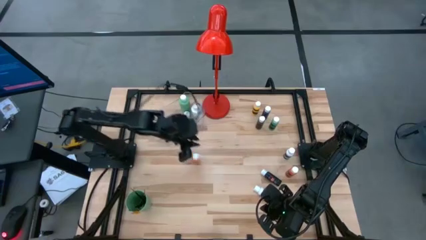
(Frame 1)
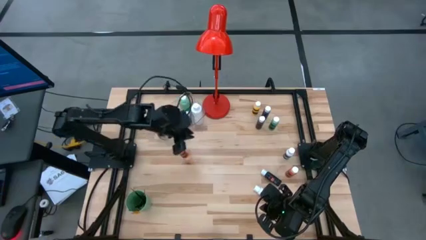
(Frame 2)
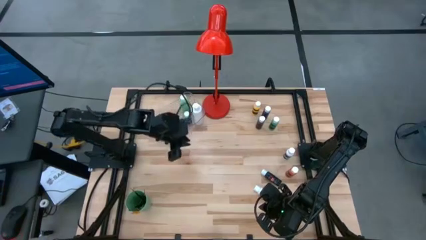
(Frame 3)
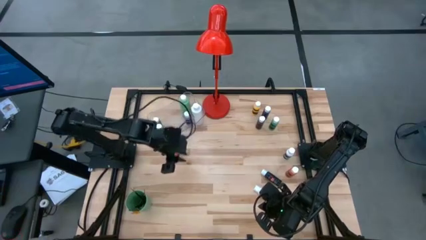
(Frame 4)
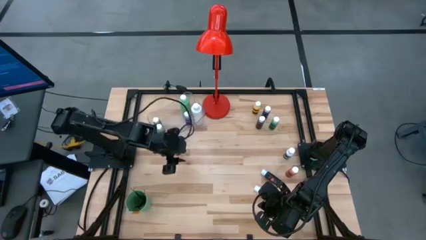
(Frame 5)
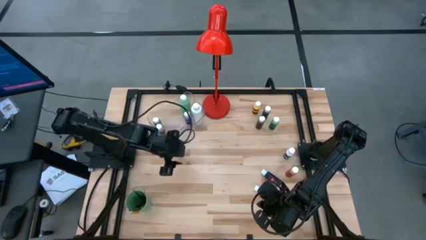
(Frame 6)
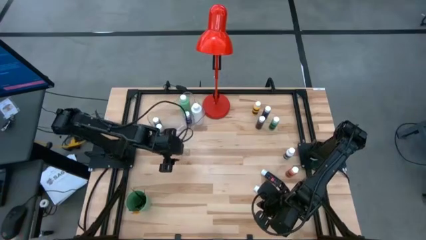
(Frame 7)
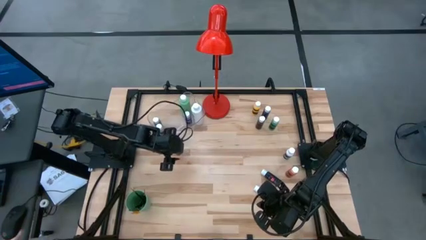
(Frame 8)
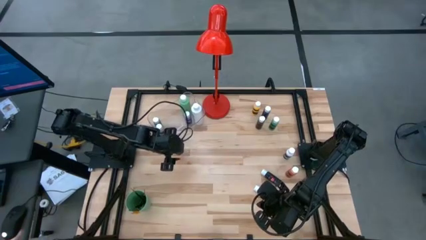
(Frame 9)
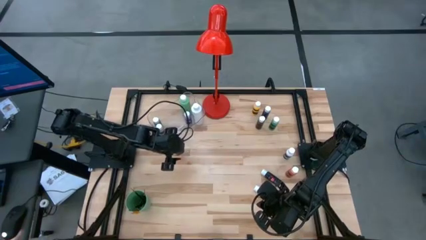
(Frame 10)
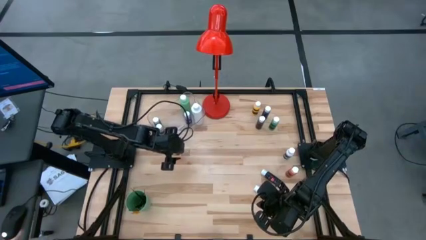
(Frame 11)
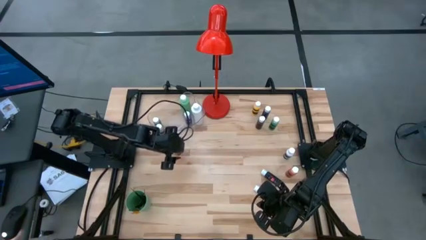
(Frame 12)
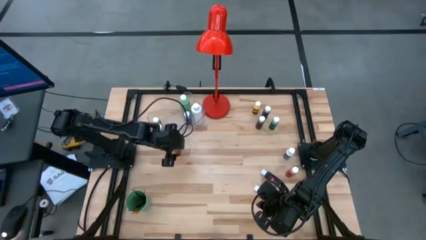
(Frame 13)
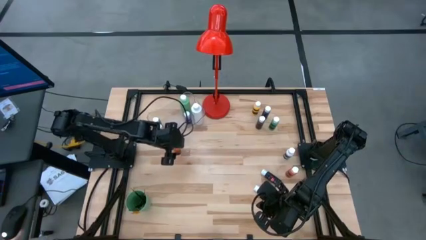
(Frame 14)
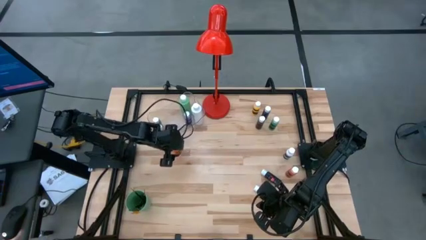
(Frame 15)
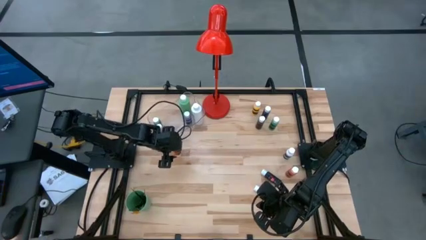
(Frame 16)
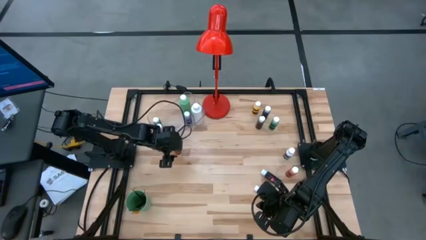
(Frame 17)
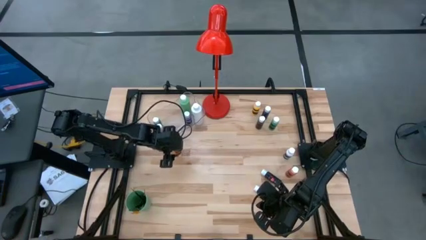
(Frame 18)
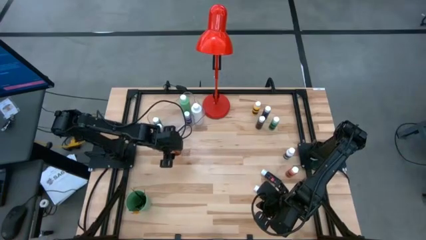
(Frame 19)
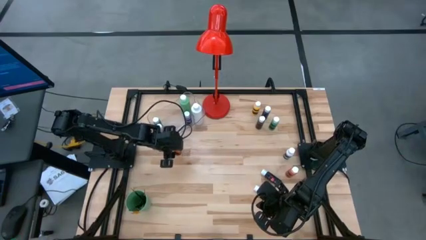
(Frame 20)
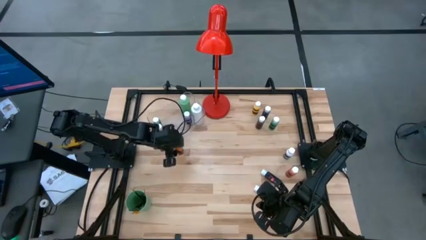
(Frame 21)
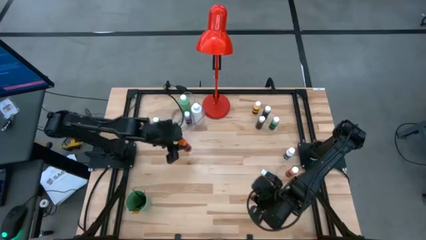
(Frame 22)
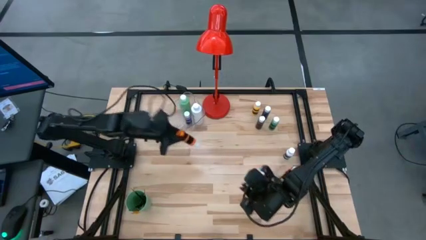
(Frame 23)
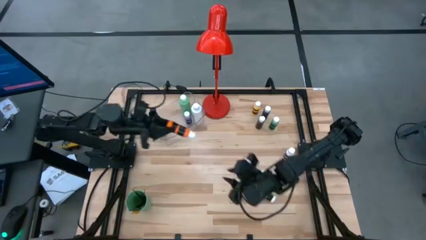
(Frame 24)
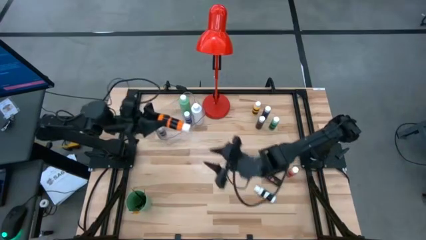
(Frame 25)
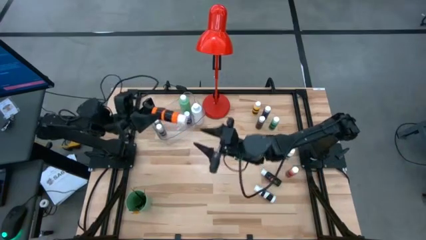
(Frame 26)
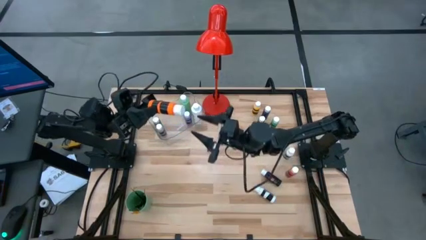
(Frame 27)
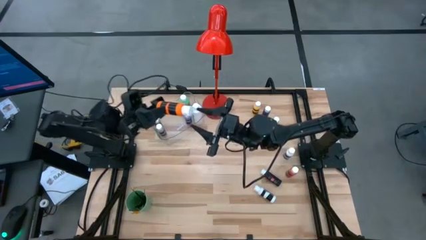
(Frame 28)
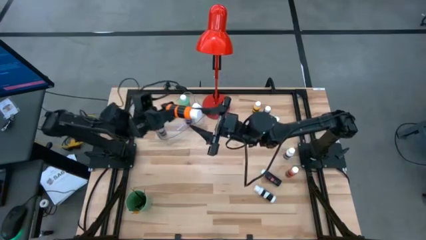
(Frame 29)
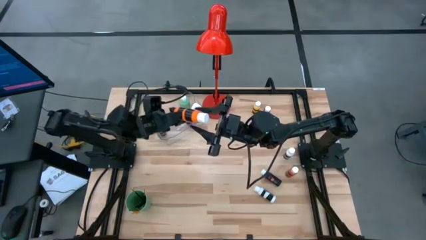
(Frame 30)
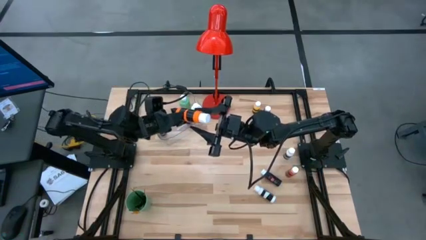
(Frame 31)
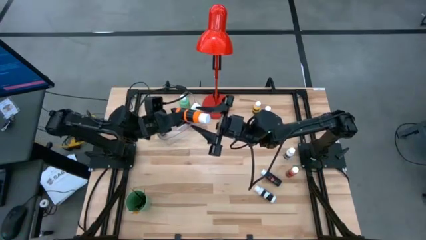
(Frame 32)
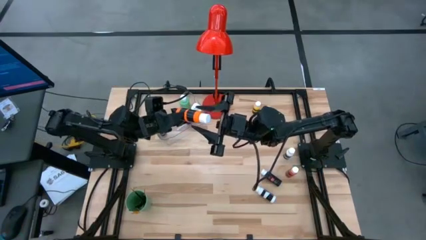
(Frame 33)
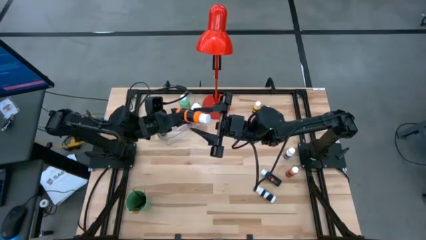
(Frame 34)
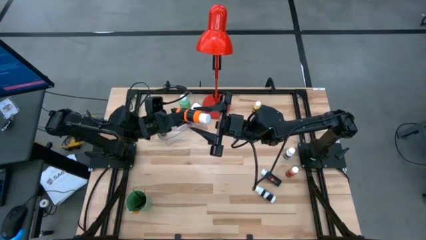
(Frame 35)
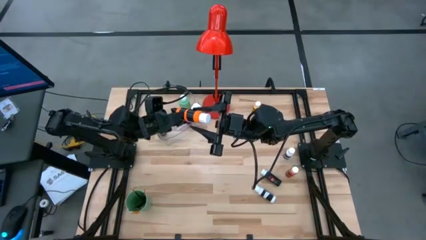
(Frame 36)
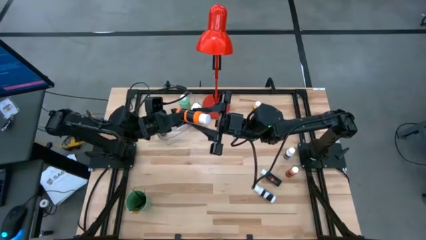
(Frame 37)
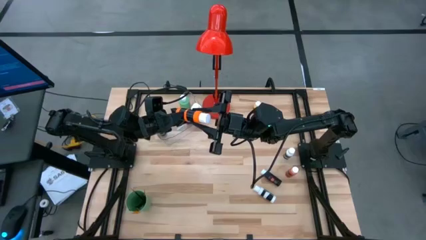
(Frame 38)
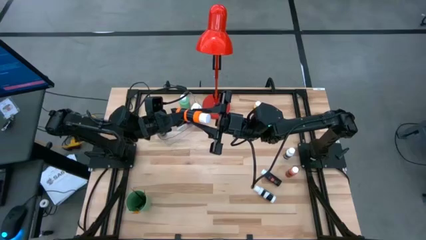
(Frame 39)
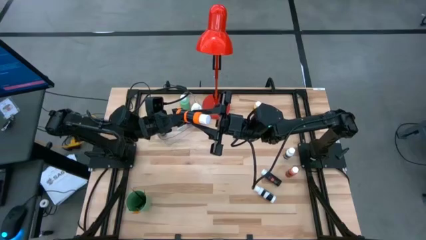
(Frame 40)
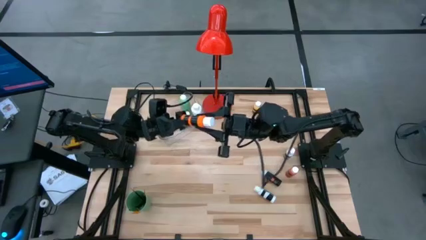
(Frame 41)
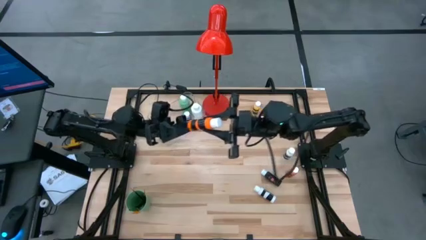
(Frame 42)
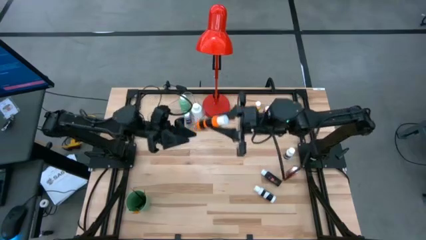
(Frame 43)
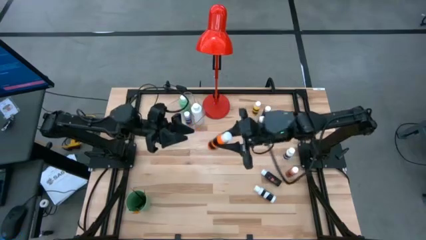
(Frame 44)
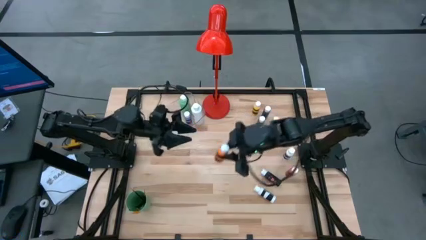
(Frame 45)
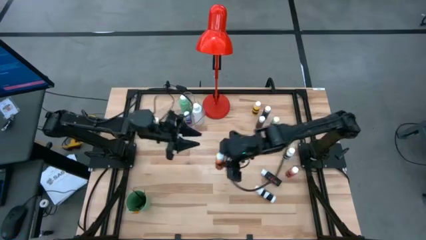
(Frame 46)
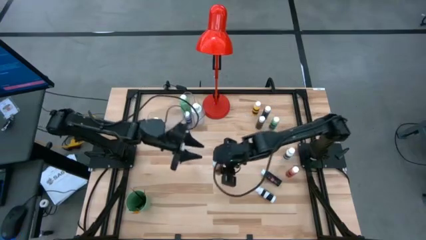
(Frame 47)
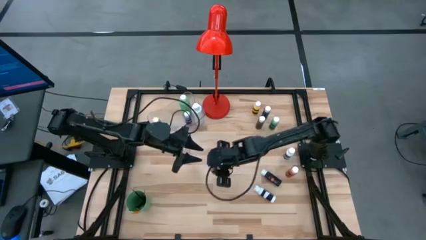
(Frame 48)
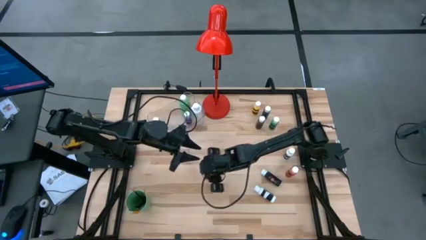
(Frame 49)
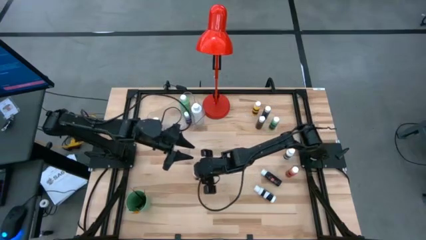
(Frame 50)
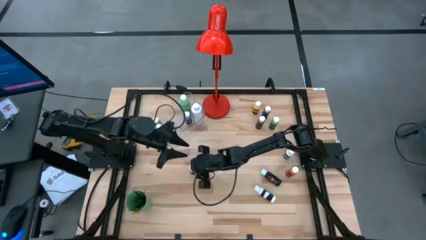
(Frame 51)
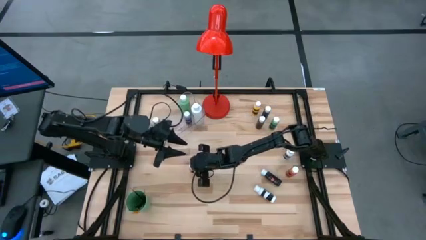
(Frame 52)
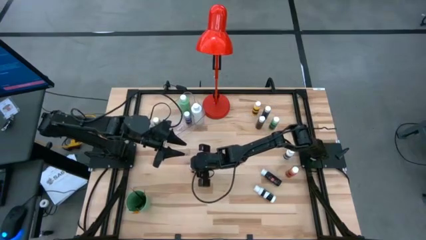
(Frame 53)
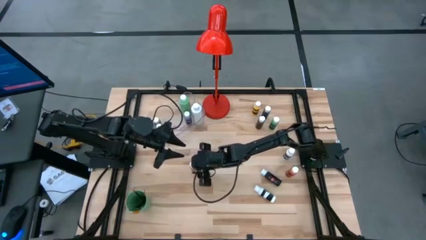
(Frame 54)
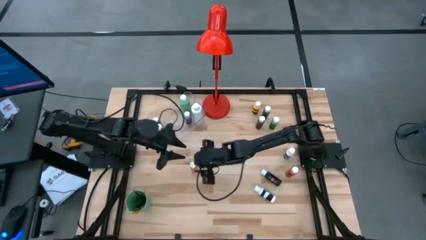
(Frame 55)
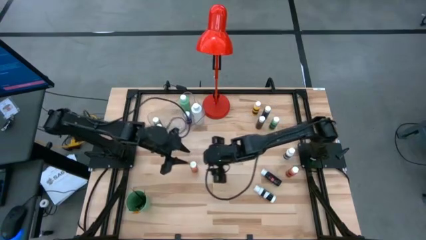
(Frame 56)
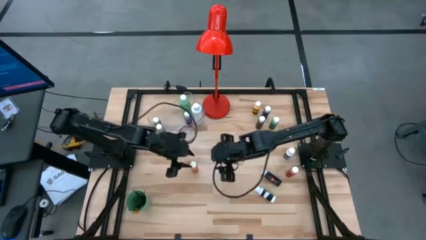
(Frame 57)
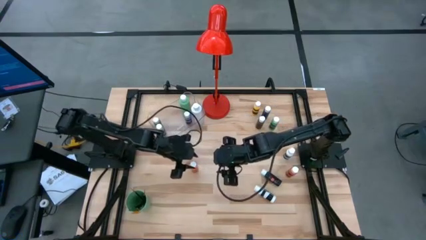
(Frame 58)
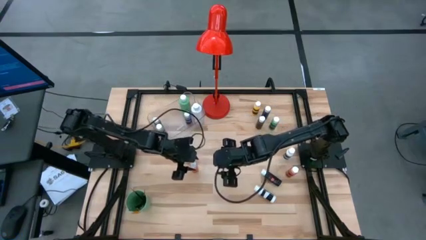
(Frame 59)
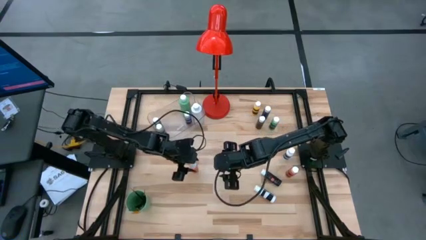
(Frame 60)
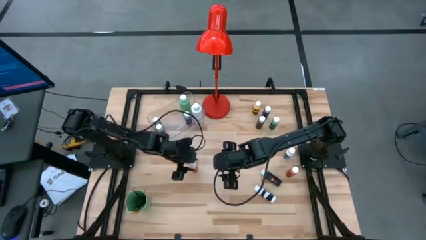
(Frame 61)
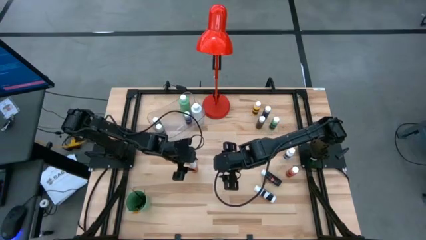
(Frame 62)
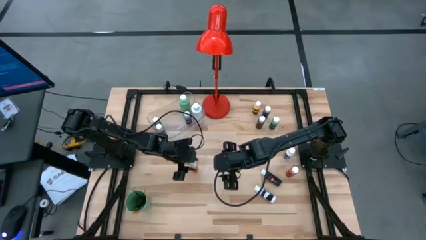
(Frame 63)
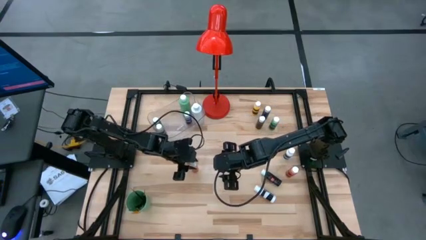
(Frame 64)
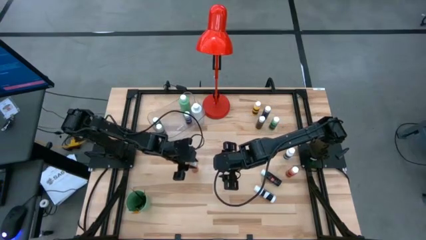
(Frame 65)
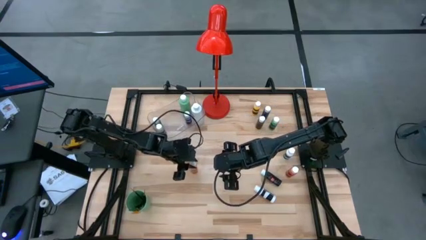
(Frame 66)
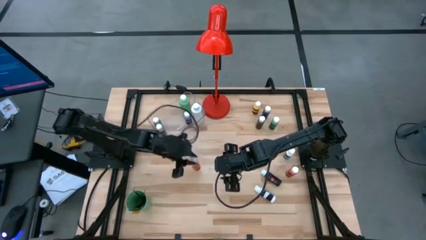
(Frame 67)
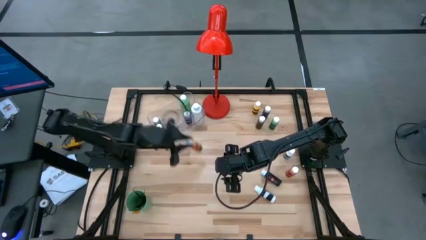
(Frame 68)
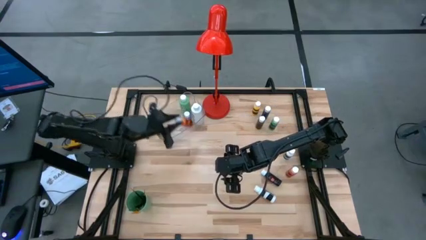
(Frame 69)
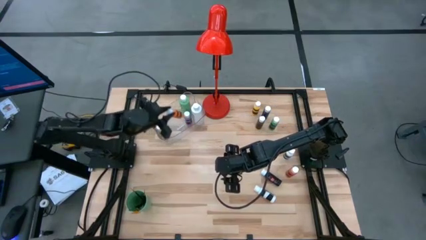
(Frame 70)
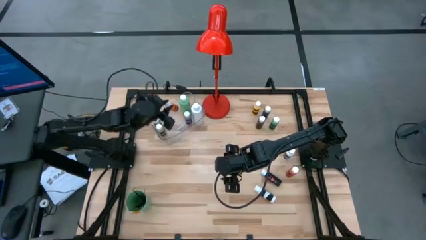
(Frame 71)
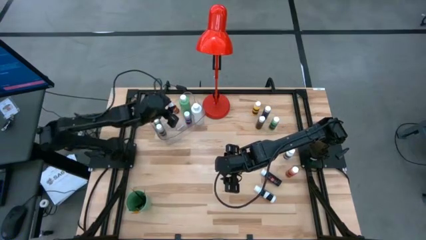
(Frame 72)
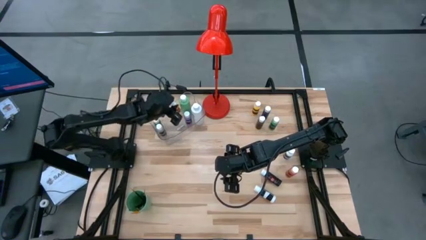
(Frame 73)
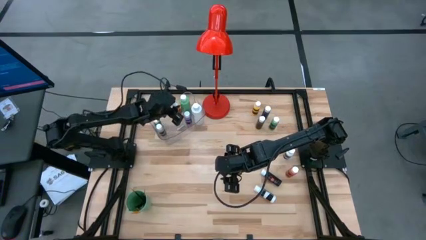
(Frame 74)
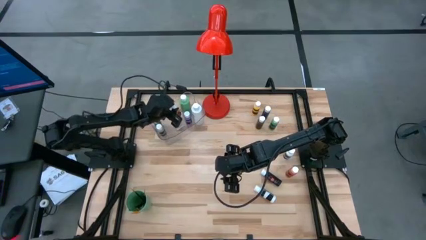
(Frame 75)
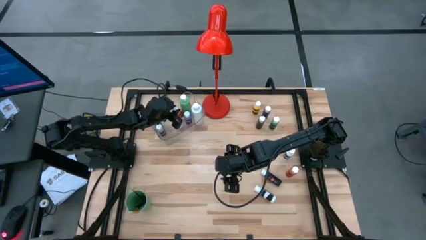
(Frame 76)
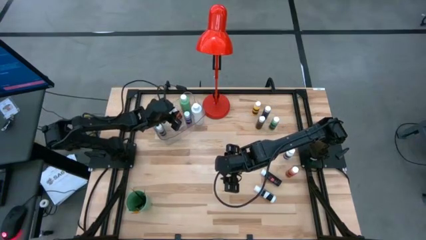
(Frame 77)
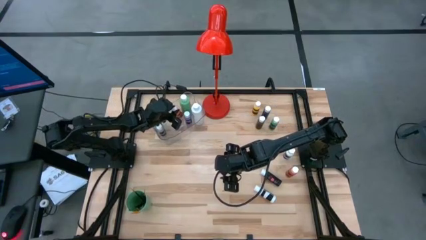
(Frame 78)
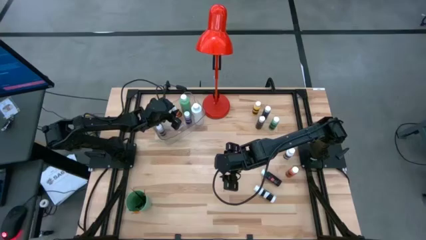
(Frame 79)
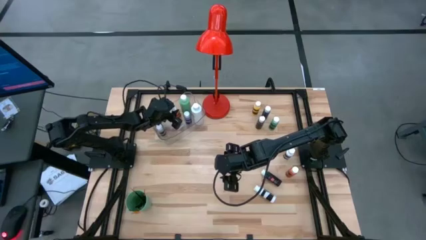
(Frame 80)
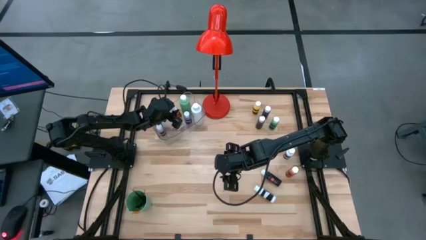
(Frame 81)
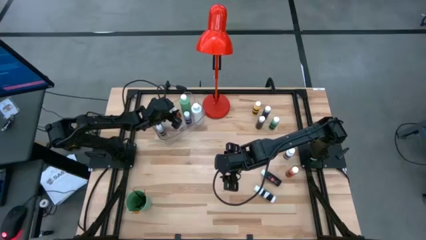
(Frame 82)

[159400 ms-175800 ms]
Task: Pick & Place Paint Supplies
Put the orange paint bottle into the transparent bin
